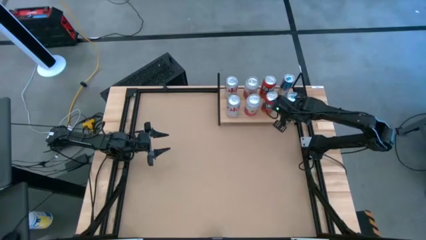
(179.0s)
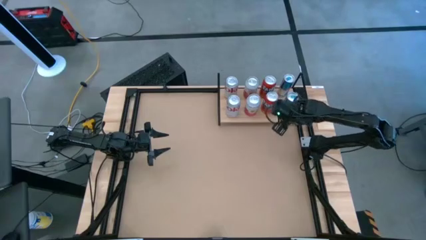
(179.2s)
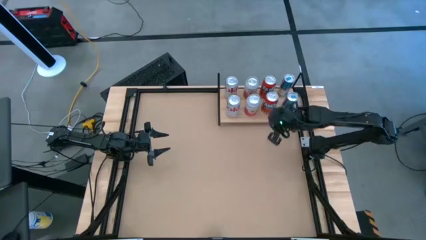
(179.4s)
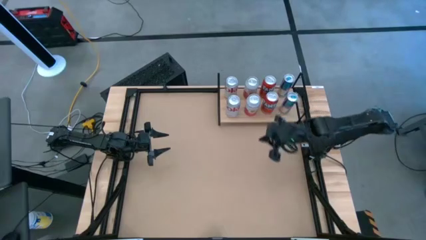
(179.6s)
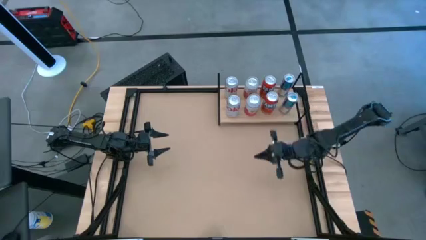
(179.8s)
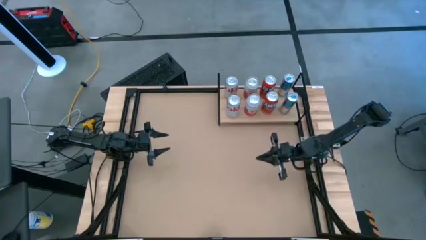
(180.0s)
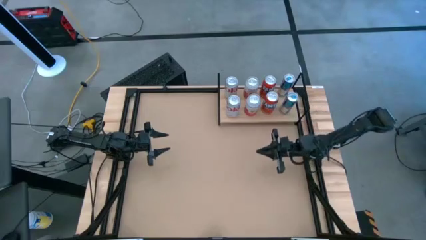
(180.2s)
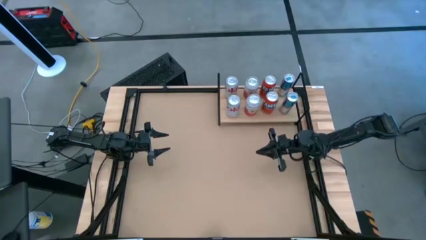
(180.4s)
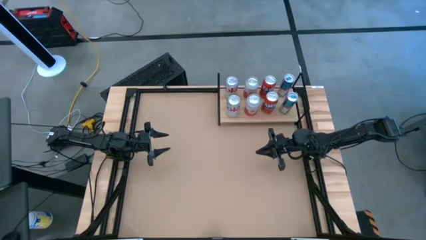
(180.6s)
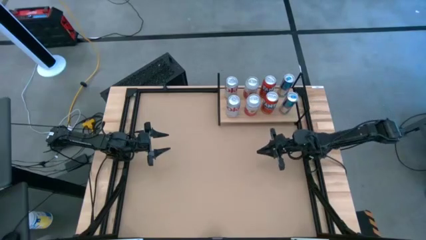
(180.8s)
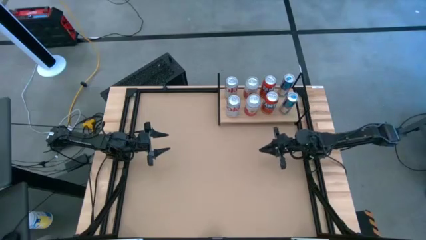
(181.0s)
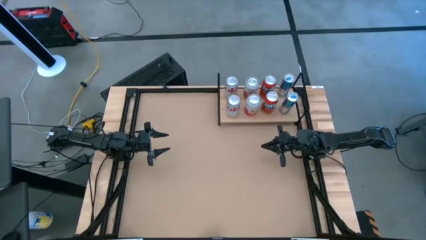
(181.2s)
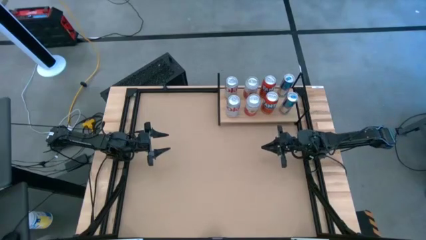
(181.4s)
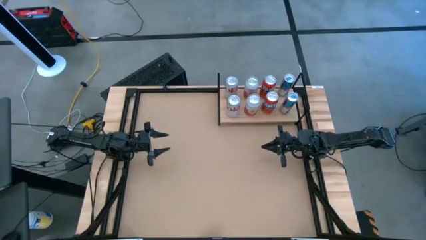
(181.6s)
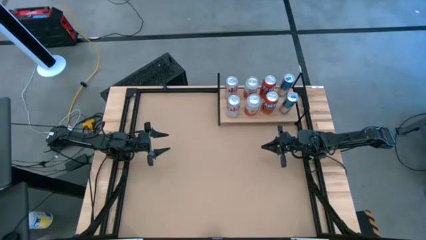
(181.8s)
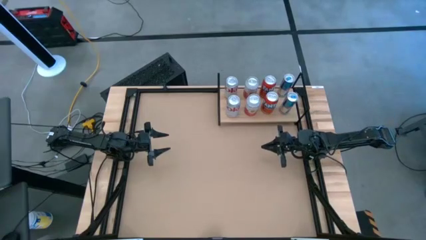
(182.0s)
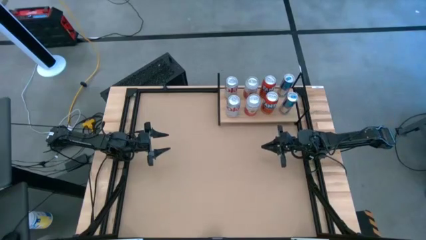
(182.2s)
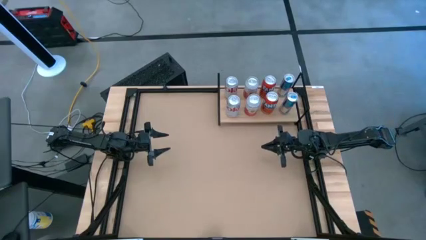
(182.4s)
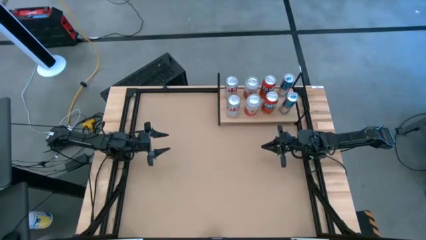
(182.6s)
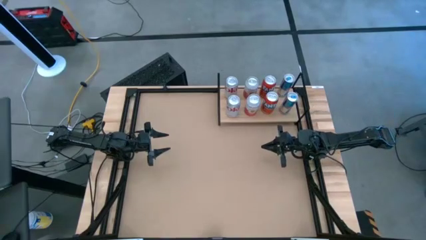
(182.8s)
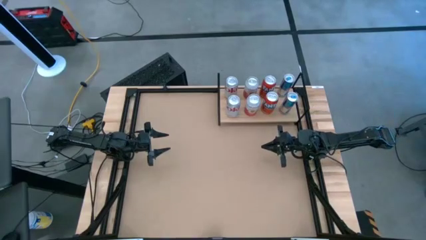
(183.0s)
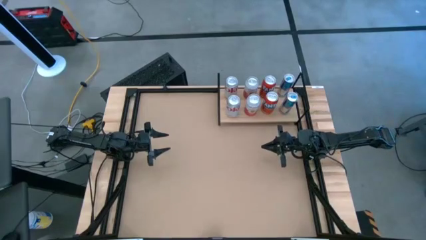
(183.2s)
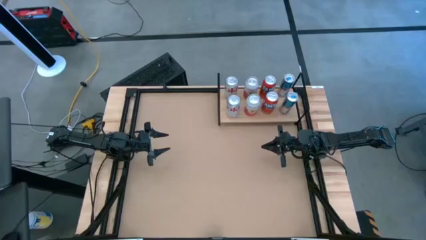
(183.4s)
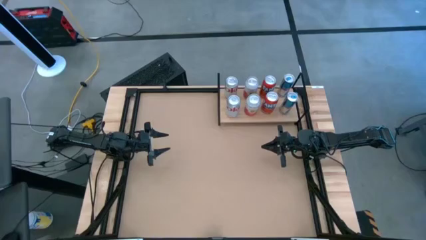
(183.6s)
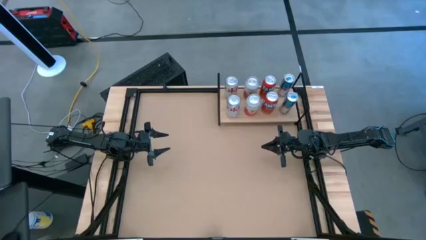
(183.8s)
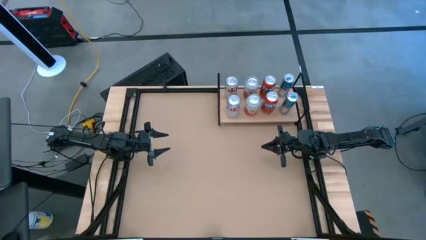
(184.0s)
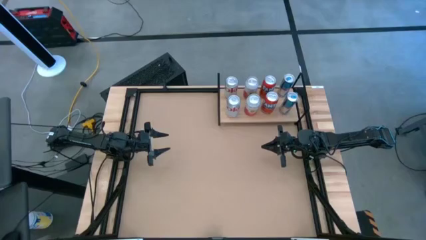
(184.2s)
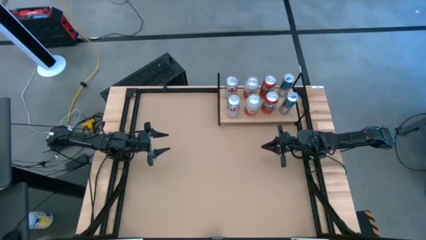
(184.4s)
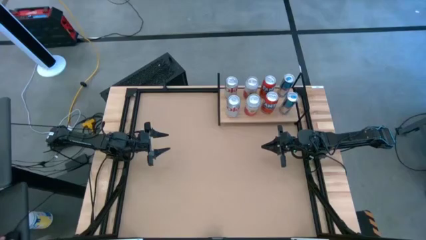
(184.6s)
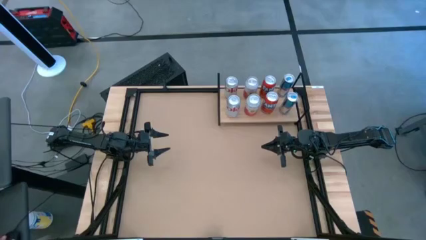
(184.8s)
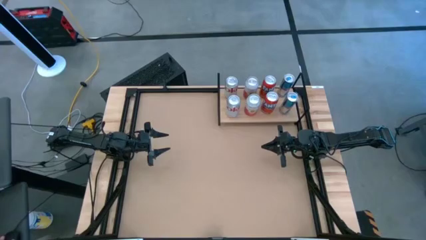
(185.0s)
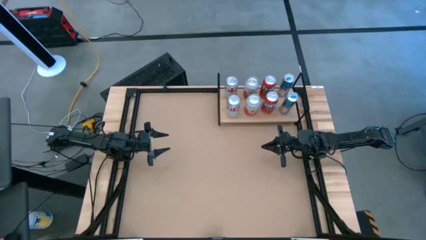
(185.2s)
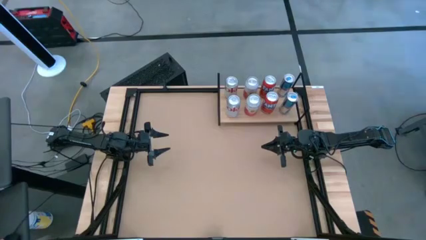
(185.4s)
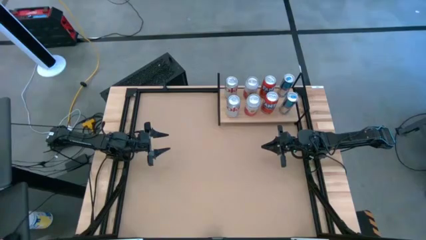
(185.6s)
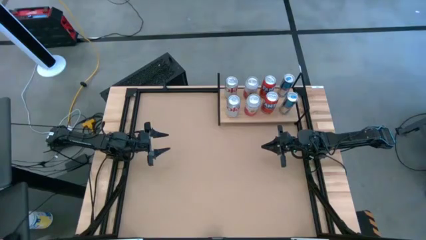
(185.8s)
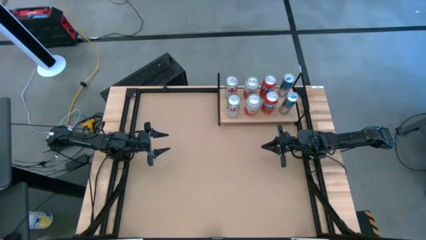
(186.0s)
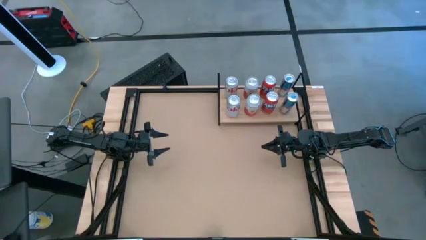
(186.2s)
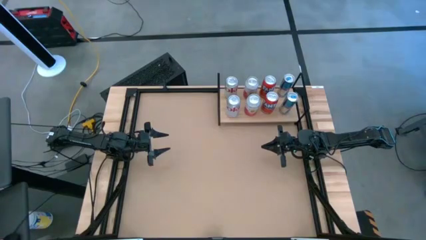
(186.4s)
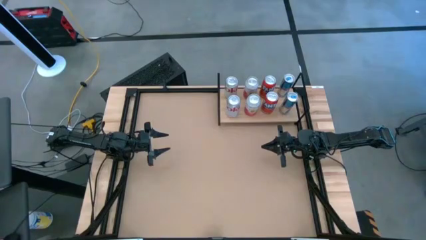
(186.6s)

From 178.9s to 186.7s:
Task: Place canned beverage on shelf
Return to Home Position

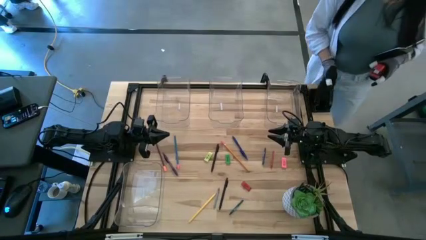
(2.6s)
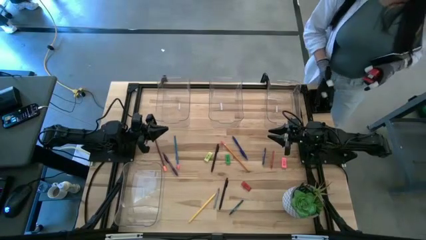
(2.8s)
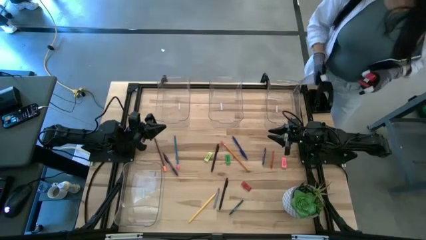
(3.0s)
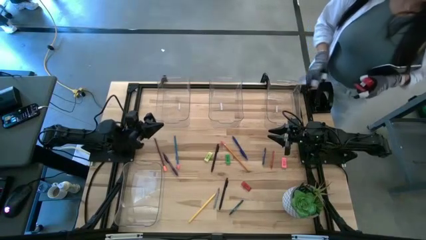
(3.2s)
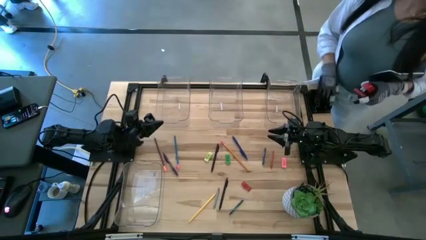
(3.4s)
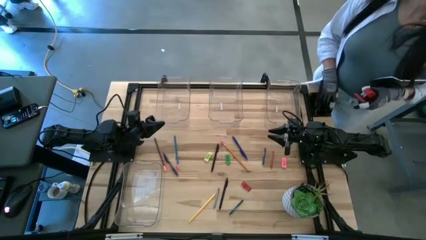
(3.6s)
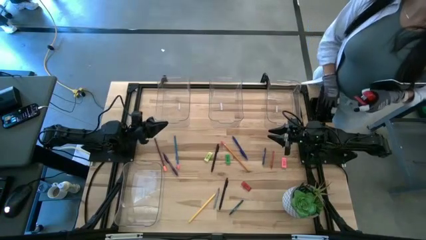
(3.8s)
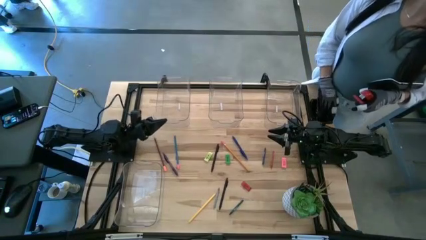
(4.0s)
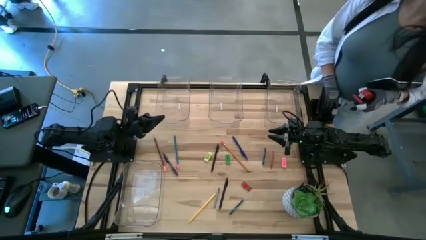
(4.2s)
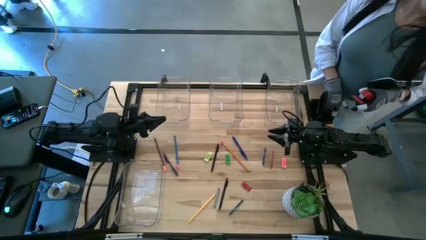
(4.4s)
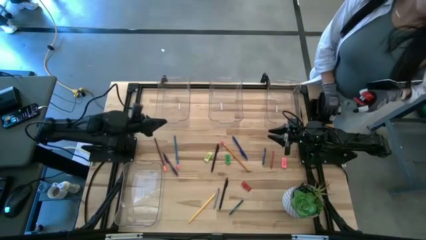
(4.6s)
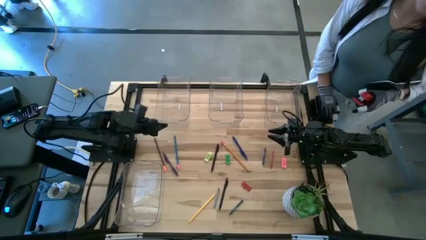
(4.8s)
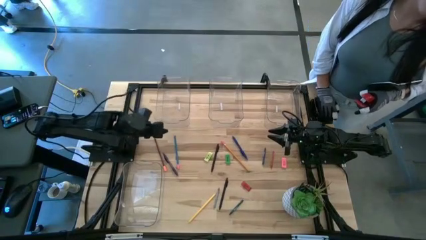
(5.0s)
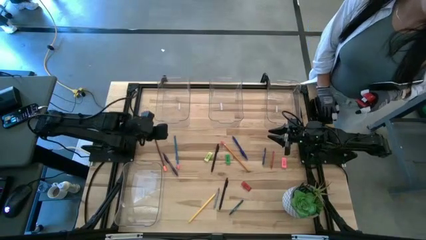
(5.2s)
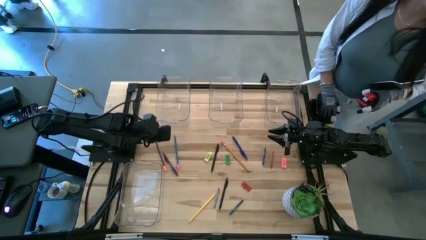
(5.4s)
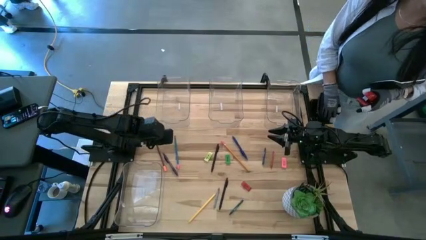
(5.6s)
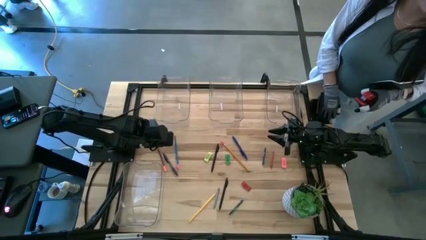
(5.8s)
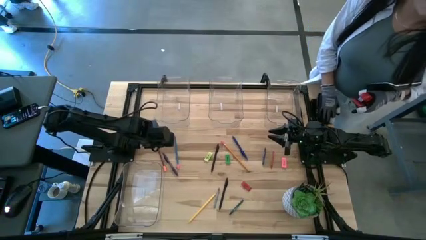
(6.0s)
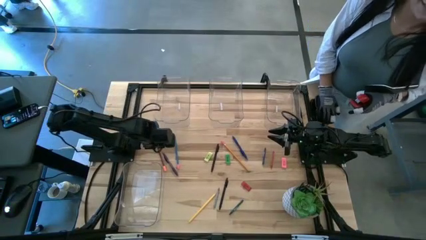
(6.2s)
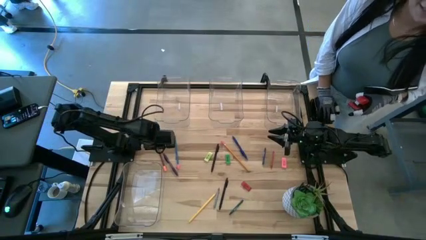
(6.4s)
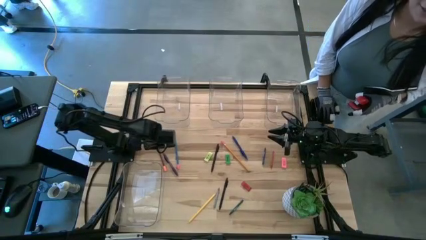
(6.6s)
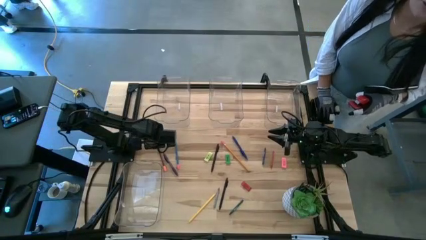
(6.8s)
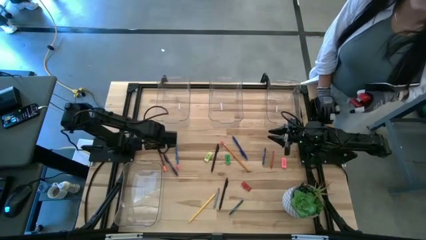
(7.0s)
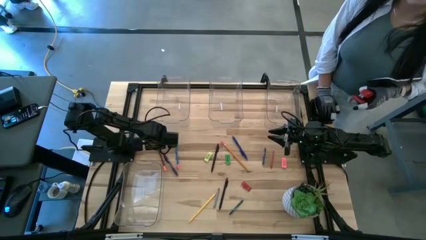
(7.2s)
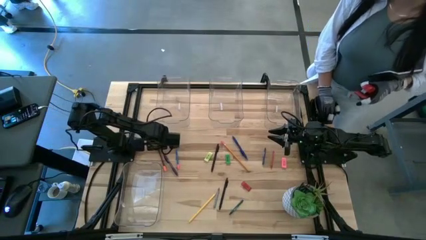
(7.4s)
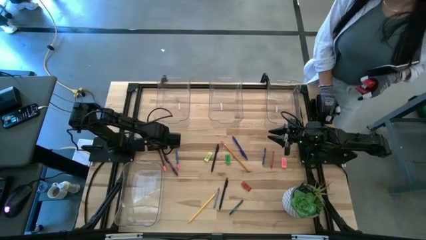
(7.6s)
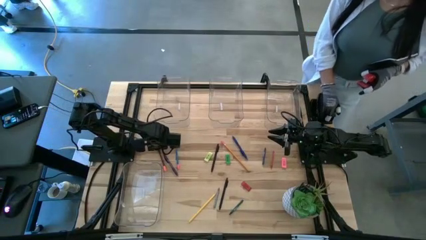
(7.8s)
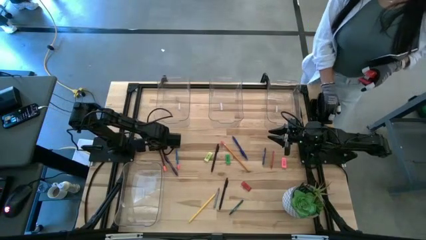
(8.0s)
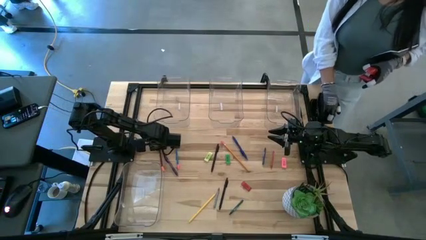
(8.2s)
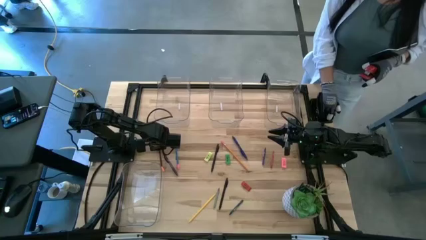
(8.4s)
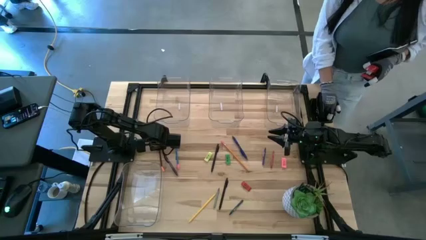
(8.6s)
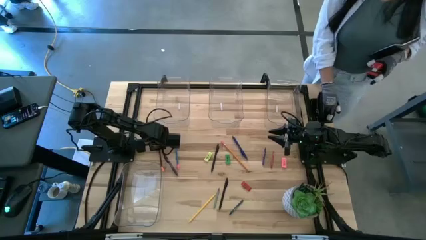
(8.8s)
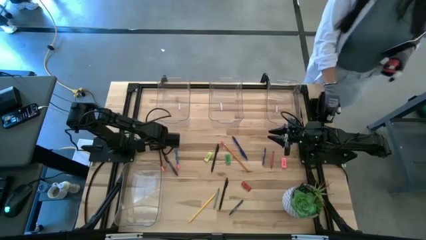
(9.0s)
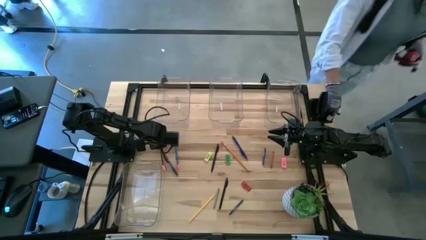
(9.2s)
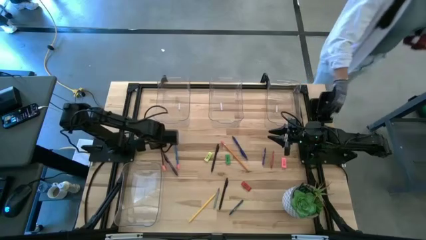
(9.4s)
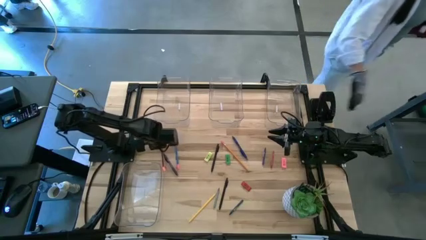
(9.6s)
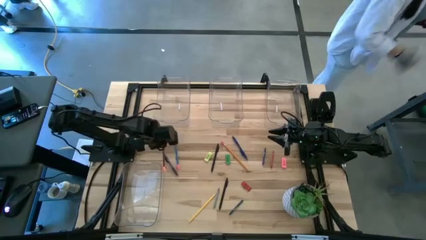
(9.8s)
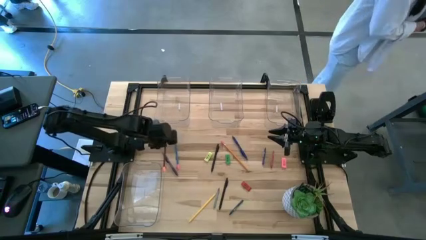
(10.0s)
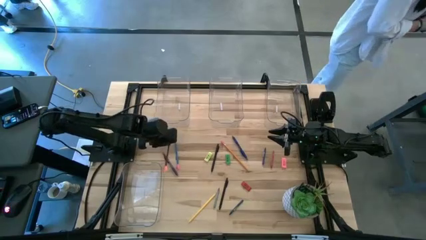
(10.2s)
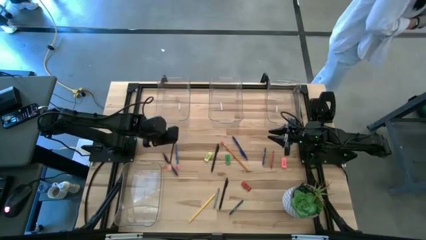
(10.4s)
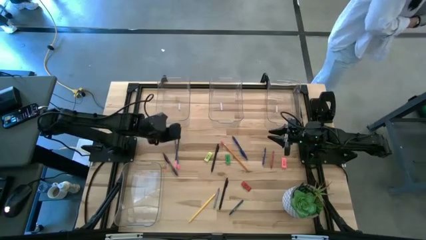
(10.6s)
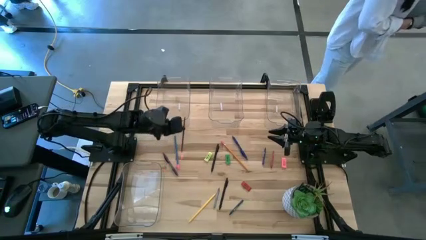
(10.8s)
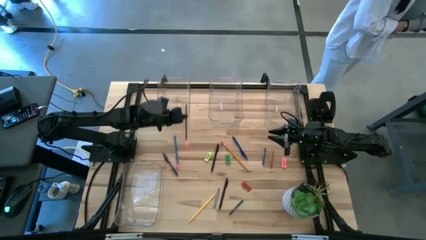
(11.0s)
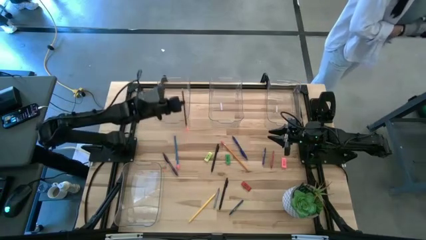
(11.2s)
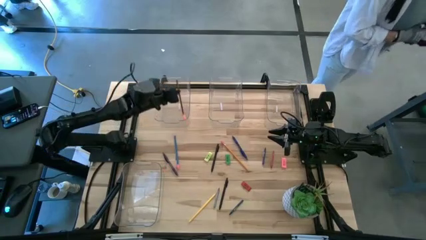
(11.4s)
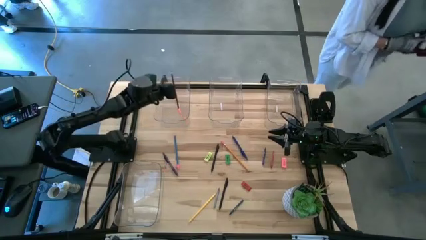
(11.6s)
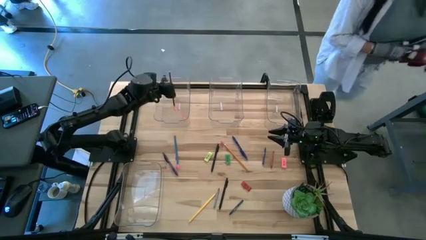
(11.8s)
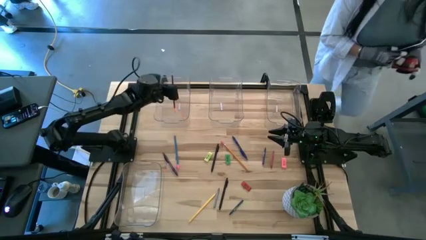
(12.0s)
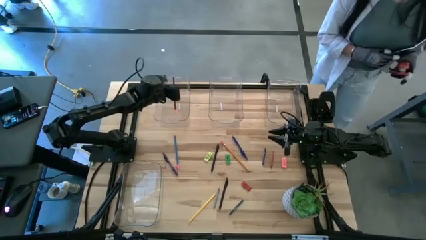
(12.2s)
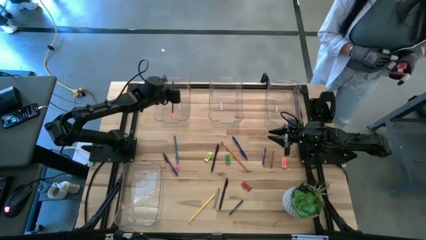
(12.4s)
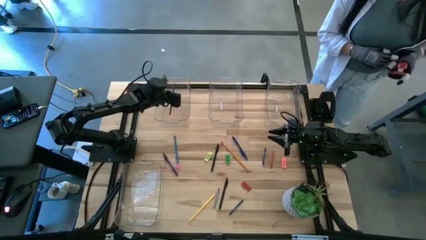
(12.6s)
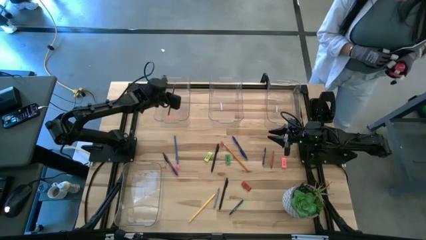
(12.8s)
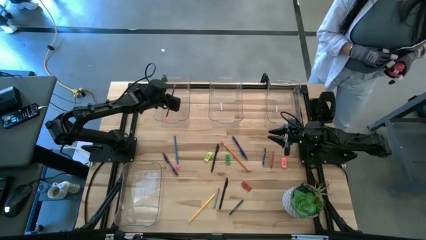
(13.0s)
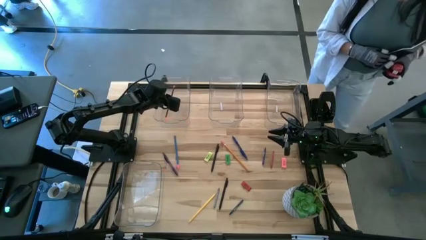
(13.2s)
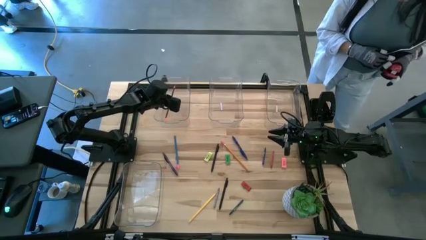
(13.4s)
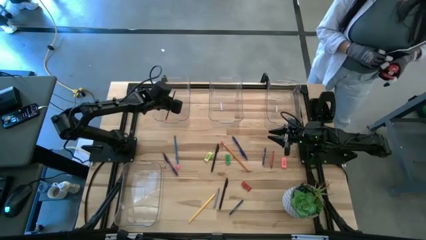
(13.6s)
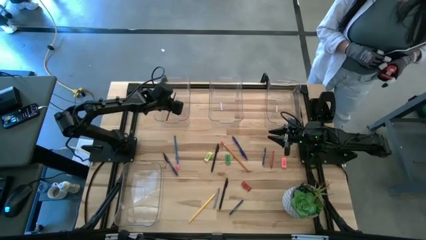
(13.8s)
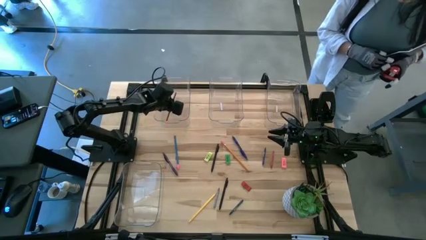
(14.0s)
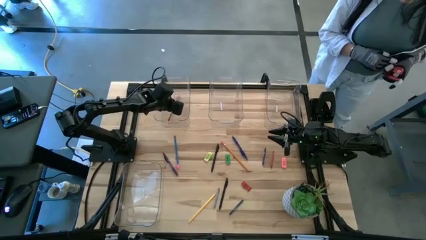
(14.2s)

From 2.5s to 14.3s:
Task: Sort crayons/erasers/pens/pencils in bins
Put the brown pencil into the top left transparent bin
